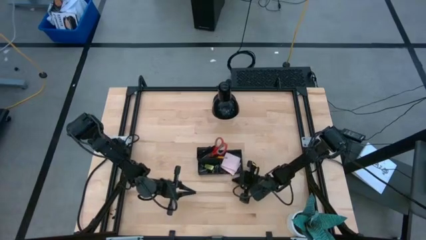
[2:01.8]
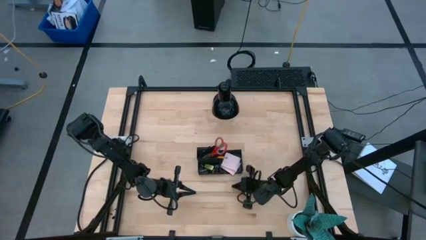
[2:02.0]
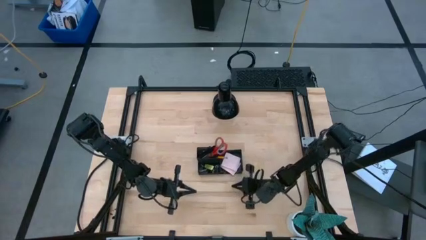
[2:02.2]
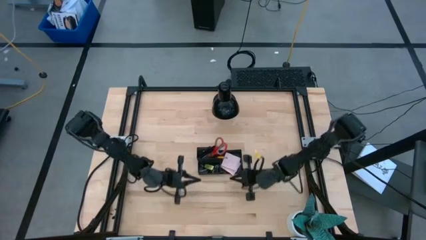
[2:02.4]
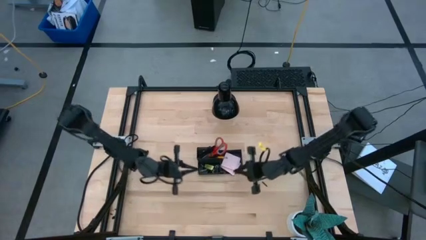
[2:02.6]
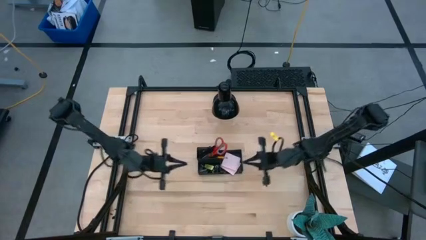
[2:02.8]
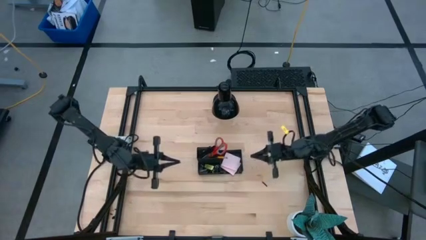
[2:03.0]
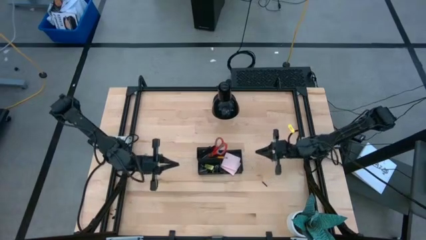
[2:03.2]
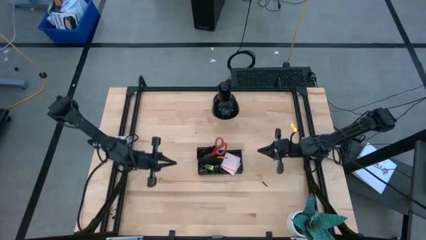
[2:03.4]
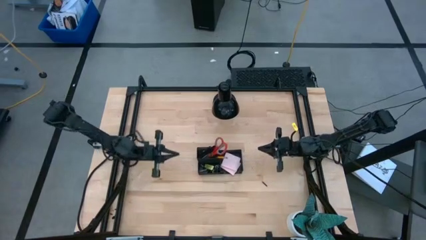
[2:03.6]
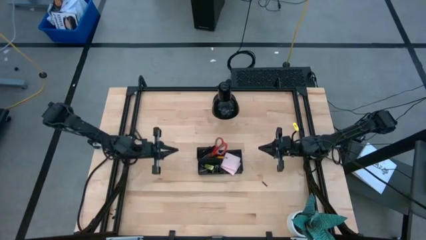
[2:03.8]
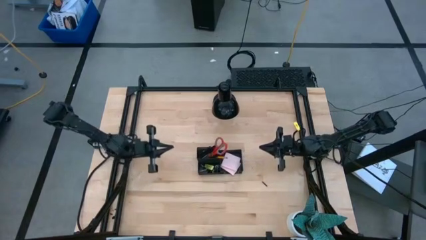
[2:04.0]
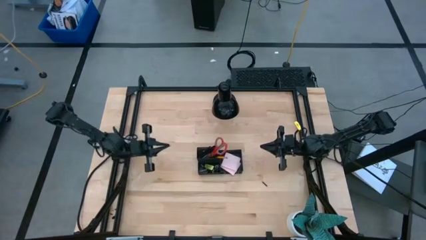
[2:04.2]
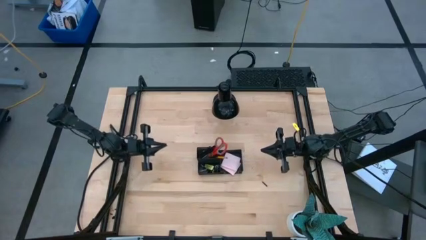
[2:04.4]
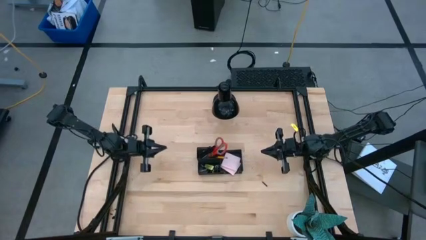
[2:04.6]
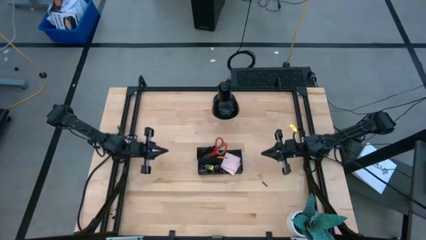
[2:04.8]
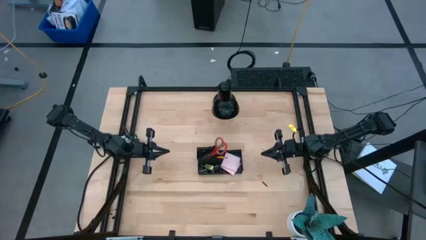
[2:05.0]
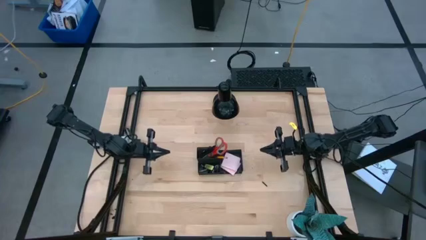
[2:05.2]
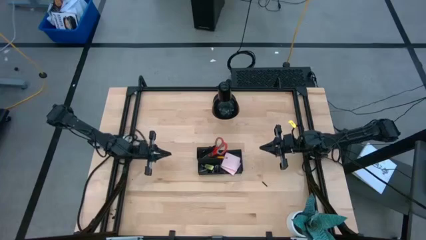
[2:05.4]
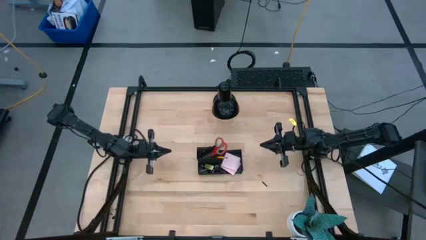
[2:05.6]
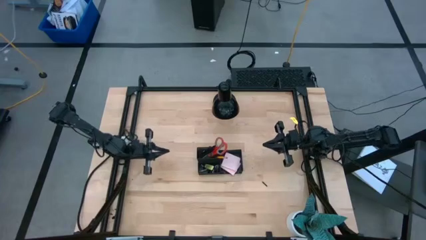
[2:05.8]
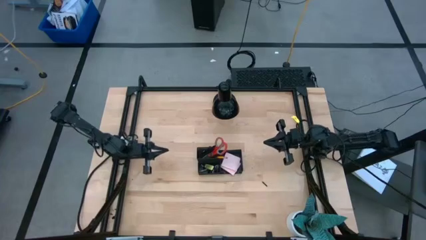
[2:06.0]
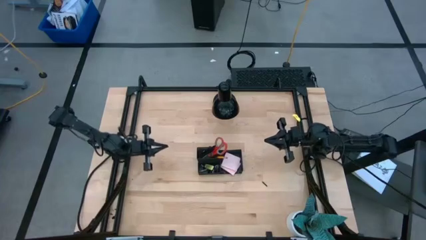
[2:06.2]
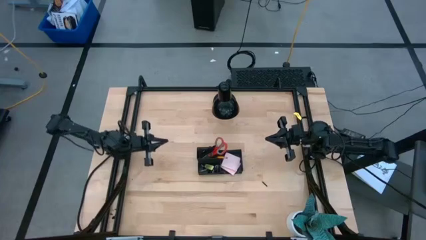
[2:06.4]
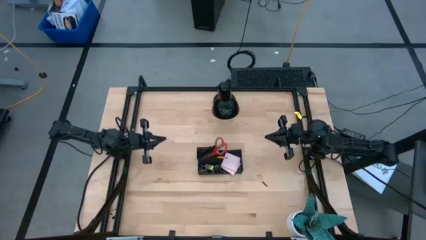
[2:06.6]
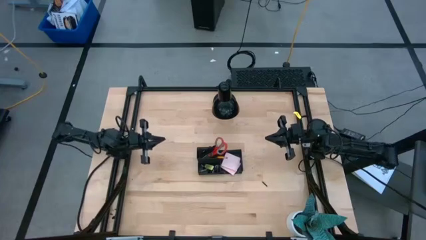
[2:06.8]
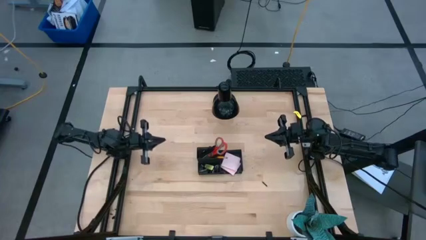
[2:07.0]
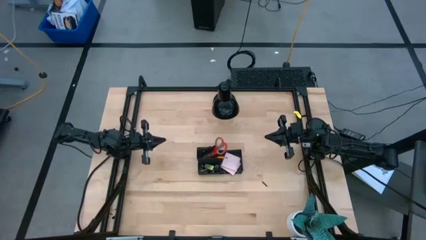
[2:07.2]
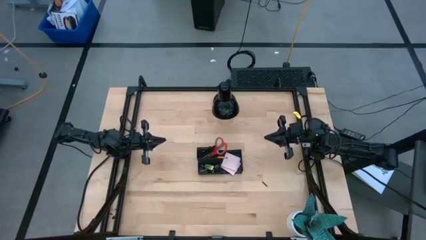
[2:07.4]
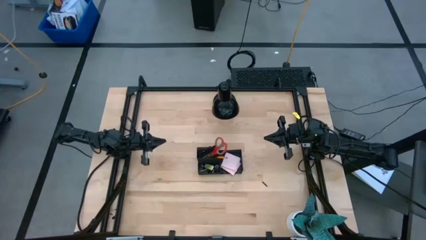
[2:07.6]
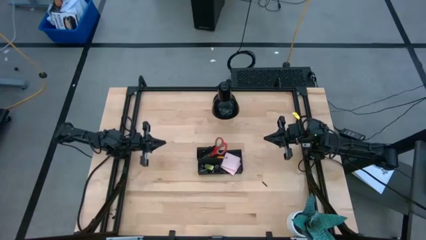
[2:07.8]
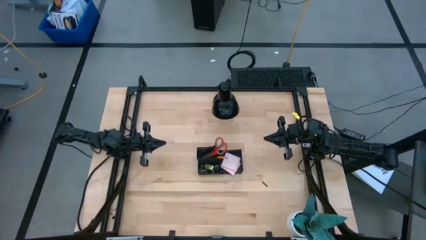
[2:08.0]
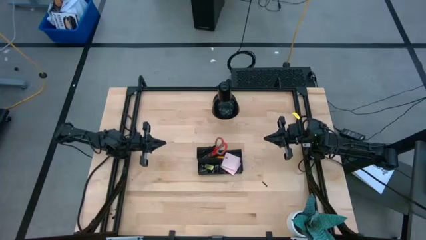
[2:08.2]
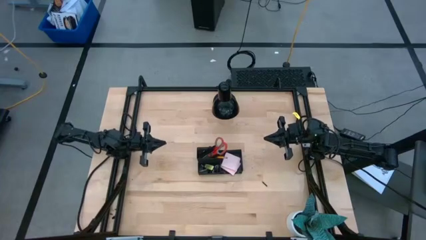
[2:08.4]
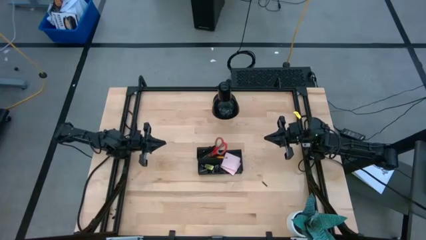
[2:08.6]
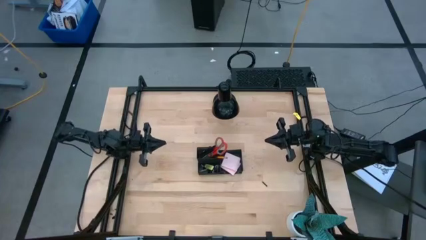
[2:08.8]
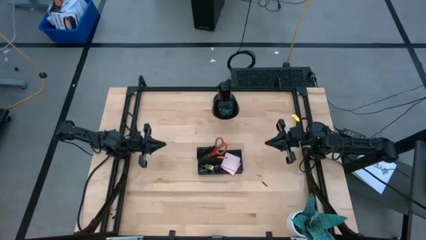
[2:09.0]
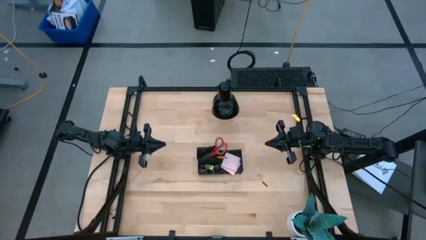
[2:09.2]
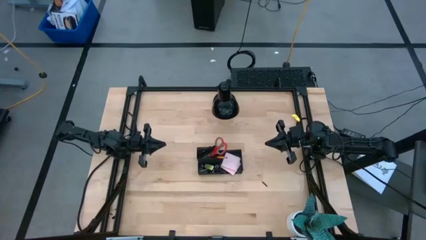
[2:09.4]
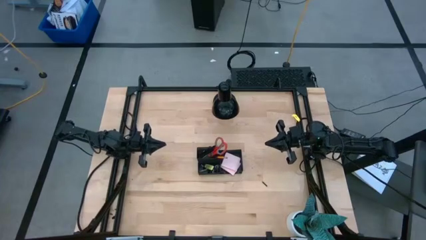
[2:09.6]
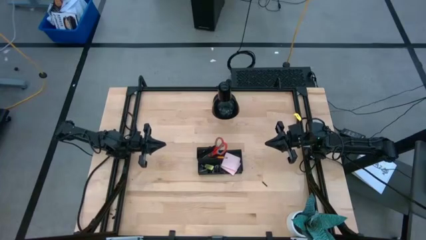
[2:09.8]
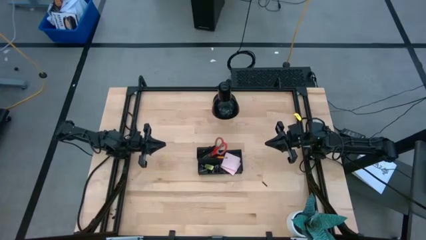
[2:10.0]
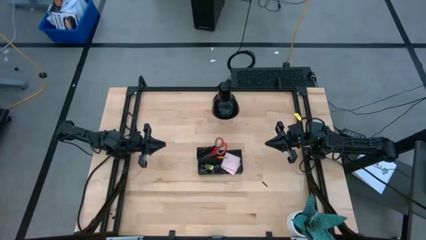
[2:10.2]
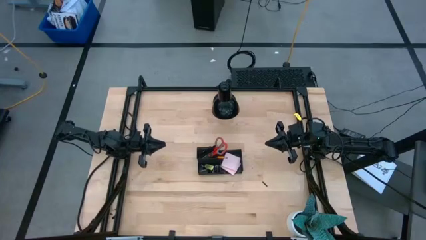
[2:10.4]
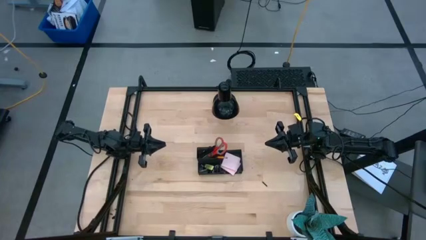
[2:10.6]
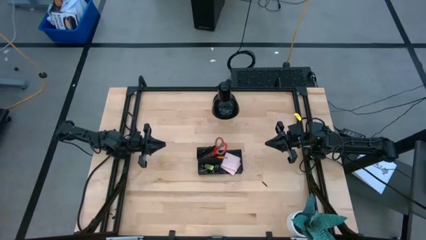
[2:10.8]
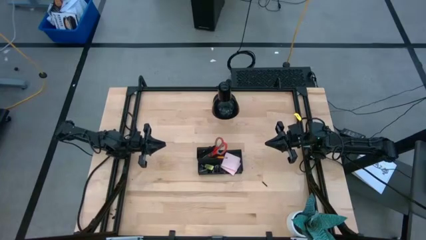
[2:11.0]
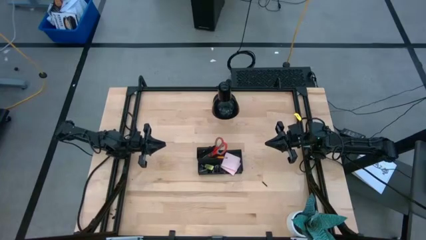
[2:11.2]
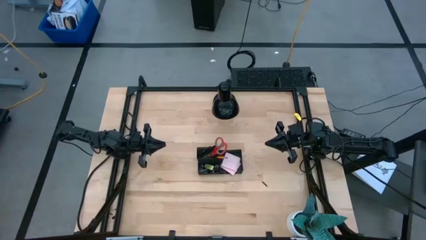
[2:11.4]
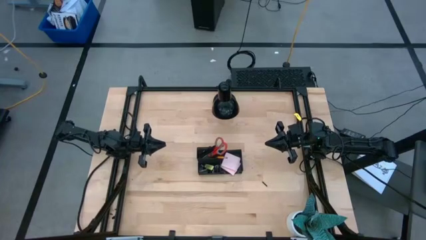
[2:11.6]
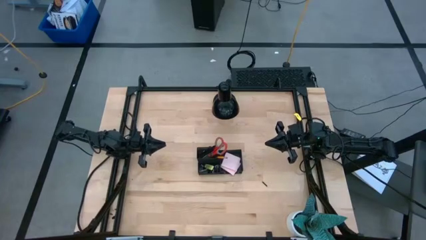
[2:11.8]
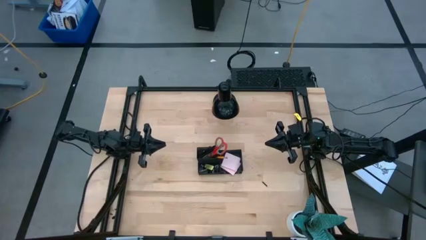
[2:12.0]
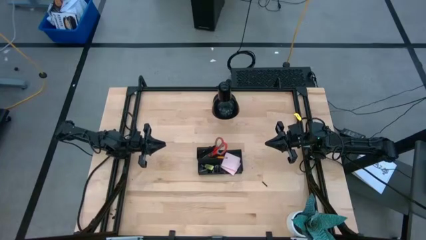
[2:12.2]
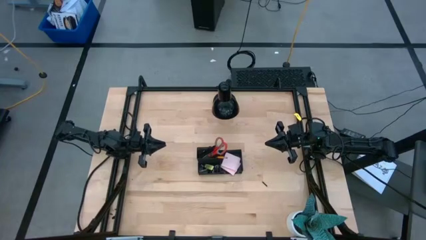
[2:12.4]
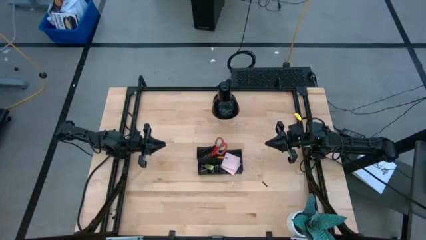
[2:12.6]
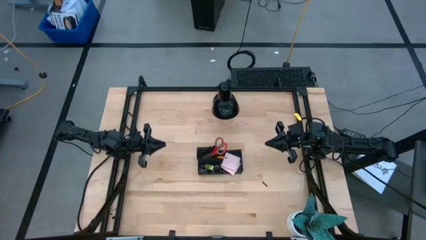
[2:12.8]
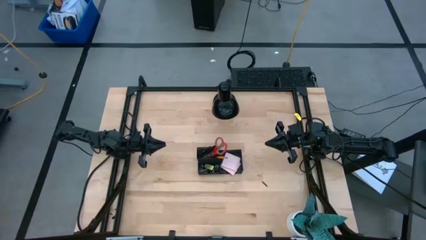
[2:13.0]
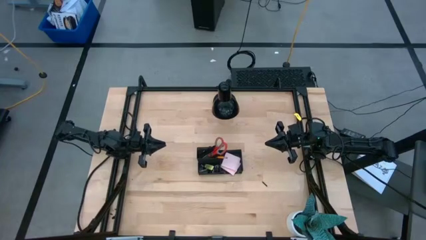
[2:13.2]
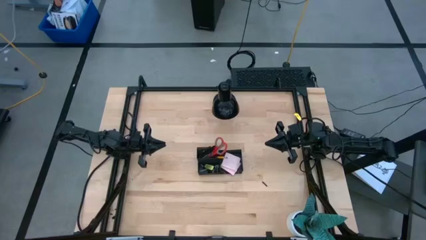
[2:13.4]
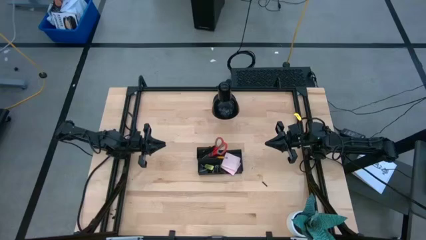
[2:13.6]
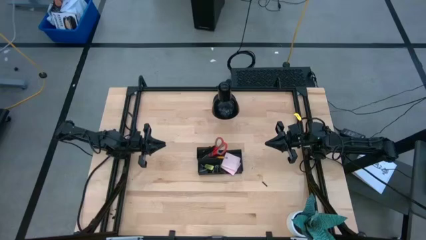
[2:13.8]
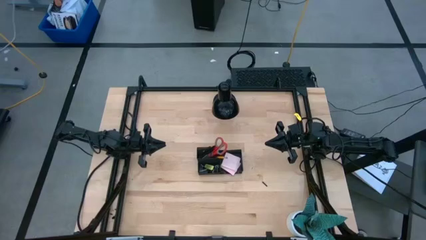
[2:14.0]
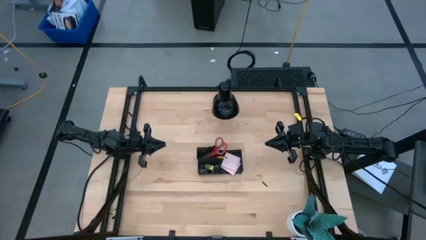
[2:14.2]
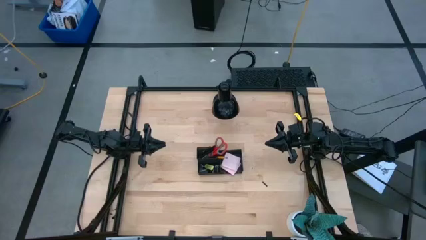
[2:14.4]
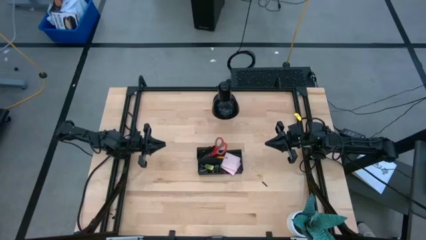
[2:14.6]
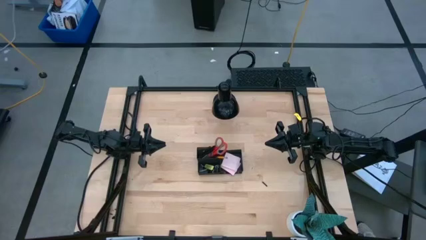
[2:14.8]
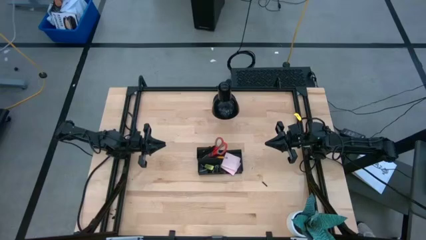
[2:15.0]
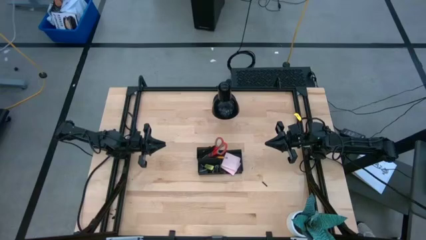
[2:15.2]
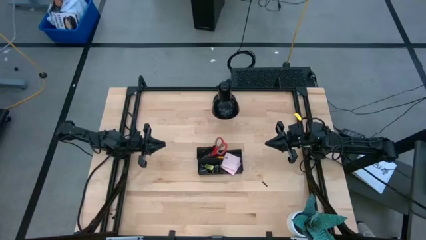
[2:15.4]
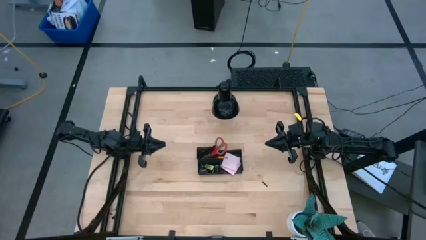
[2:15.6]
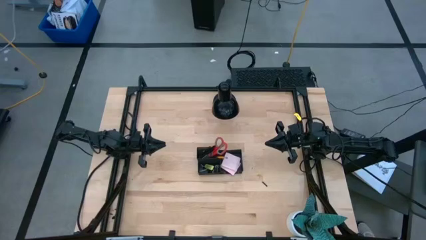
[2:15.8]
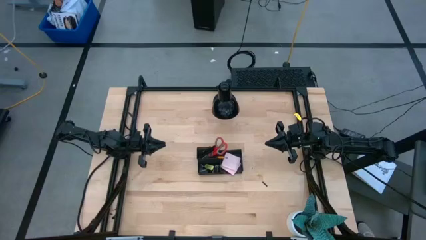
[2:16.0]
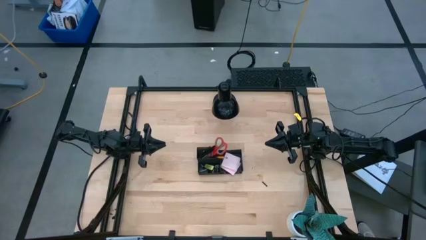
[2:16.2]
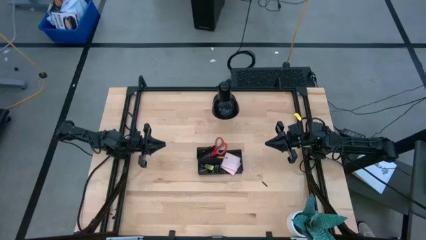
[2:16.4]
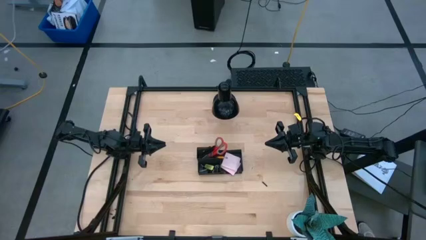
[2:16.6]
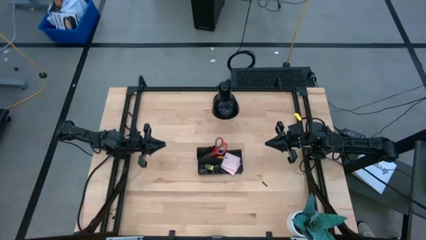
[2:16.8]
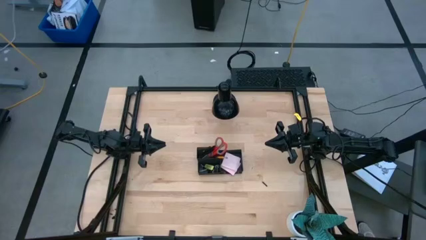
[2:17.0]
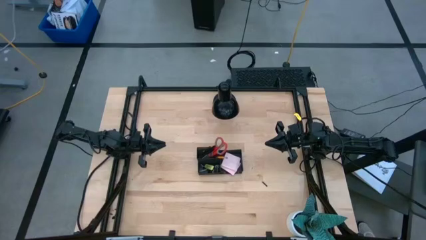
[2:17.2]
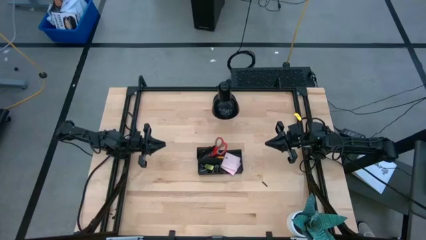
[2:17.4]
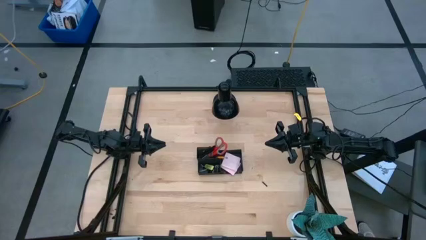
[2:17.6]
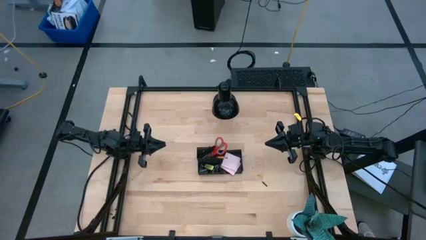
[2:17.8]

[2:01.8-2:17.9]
Task: Pick and place office supplies into organizer
Return to Home Position
